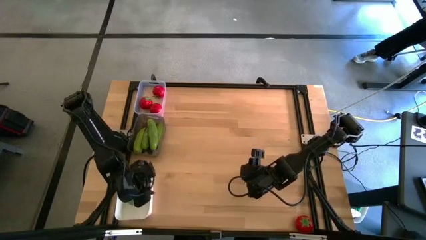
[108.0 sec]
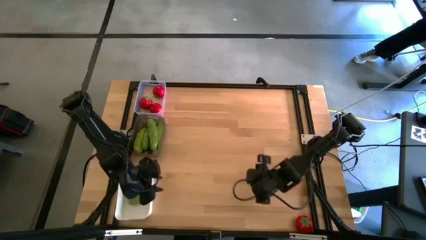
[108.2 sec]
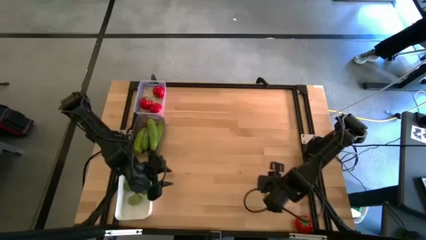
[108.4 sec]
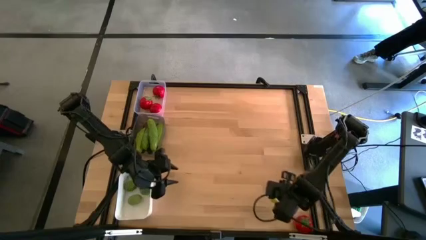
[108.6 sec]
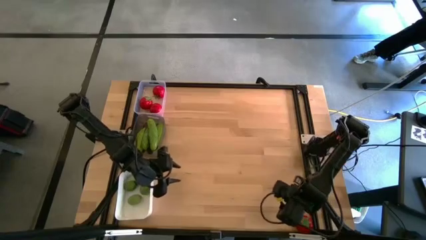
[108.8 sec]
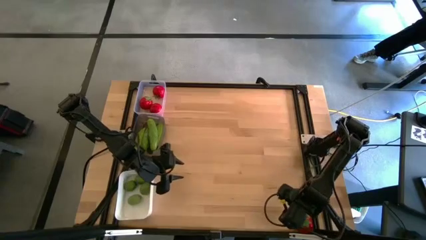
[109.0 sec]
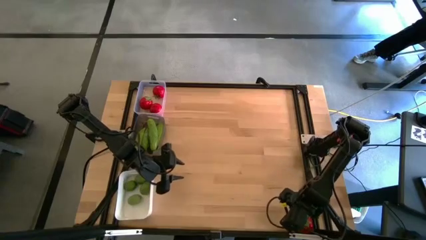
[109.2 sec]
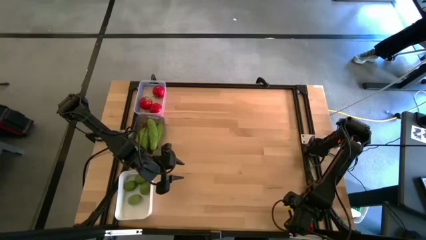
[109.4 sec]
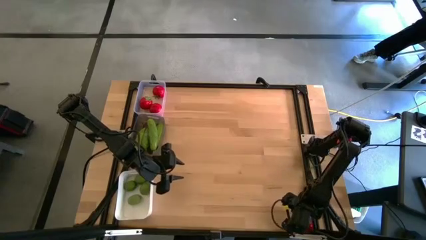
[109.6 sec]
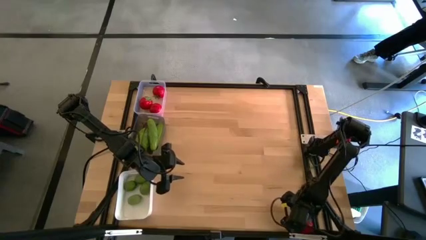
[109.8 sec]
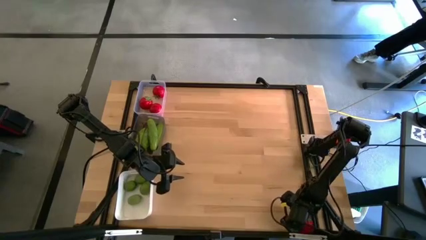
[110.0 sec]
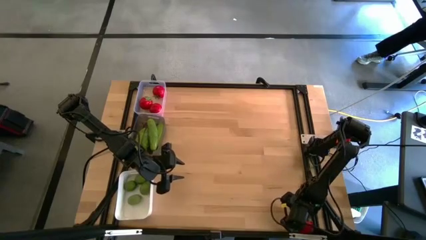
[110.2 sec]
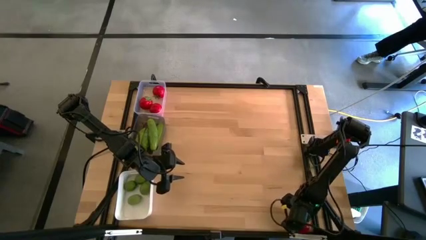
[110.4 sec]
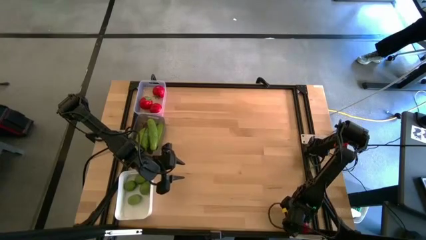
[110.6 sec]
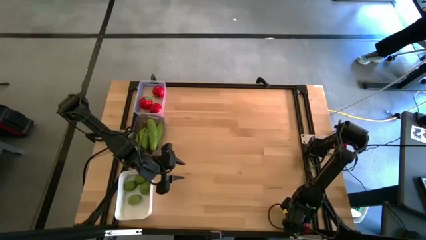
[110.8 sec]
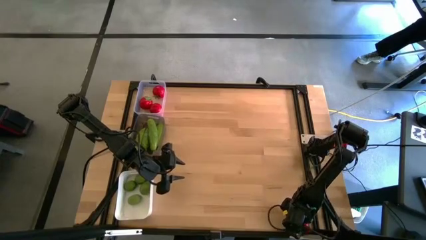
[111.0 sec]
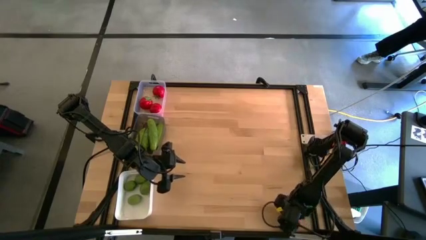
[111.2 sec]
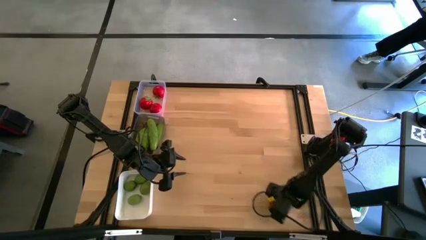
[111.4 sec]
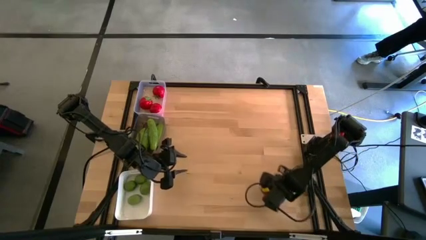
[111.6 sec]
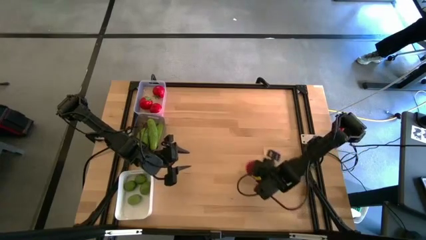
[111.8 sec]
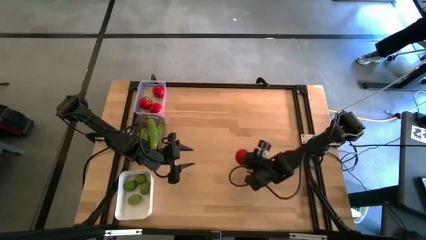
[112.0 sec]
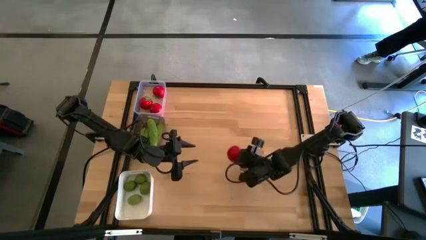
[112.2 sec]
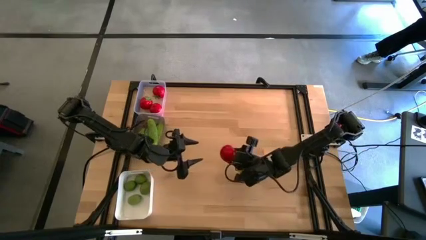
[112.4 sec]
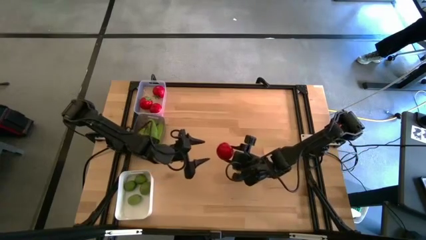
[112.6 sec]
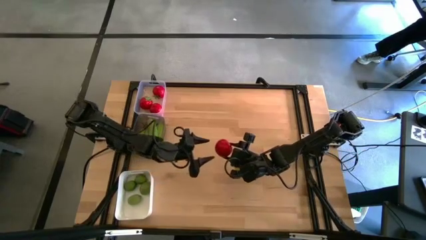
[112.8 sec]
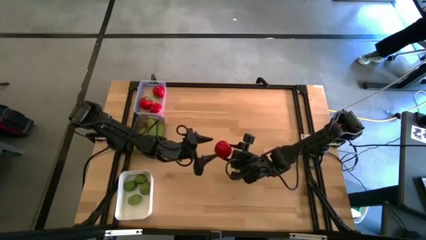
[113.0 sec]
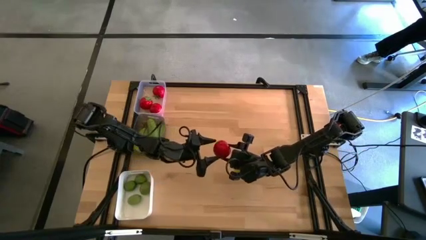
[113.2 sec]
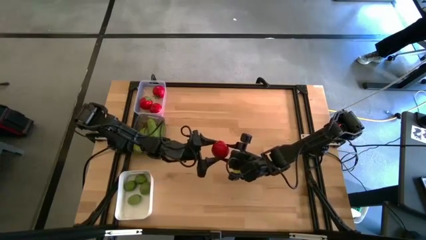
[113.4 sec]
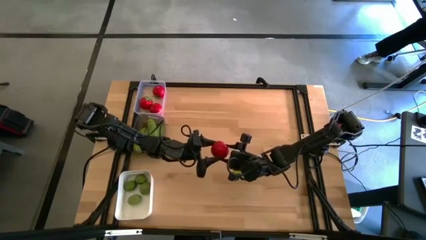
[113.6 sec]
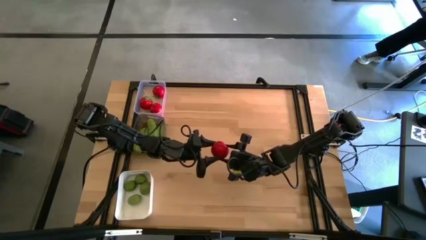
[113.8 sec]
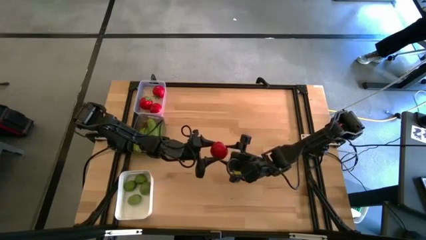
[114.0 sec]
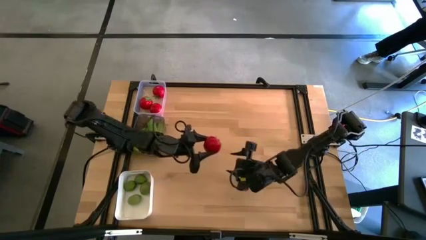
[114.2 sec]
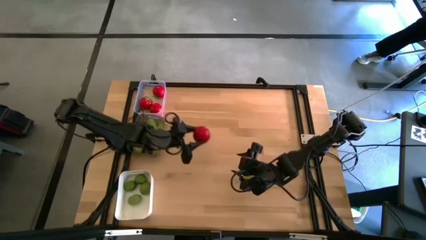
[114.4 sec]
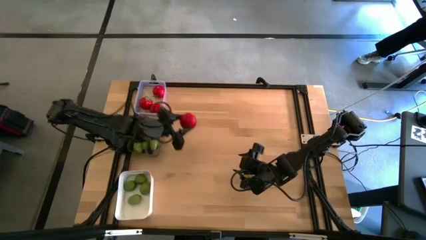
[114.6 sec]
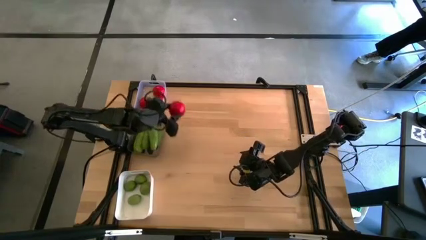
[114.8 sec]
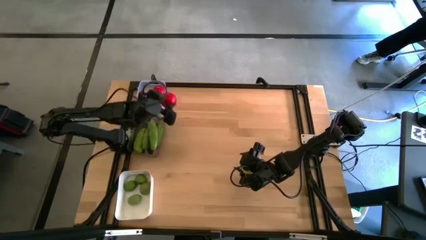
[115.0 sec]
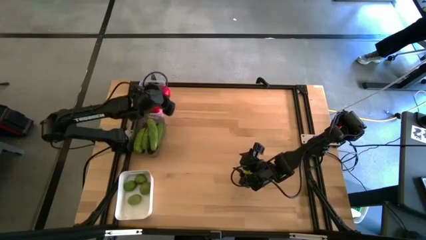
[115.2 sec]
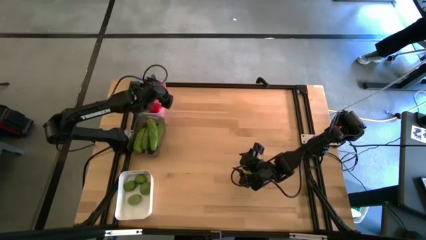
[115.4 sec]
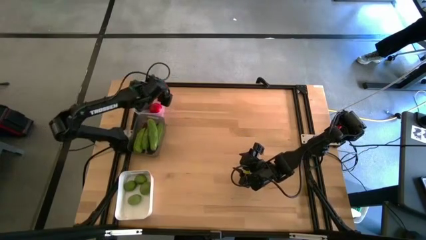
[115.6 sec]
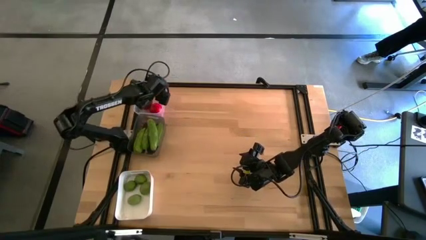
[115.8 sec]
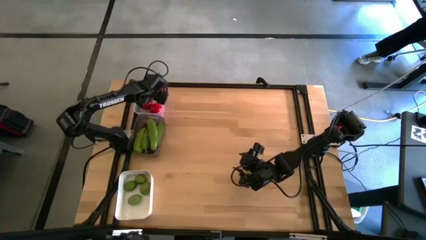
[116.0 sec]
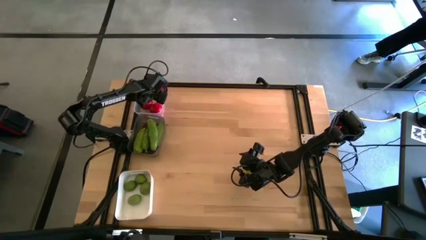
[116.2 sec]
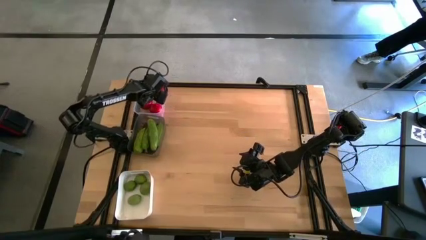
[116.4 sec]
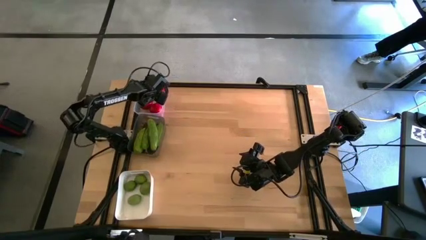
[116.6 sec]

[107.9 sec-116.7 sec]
Task: Sort produce into baskets
Put the tomato into the transparent bin

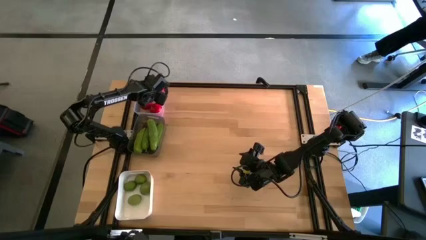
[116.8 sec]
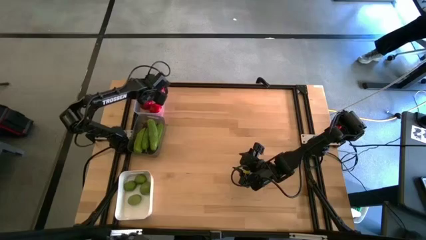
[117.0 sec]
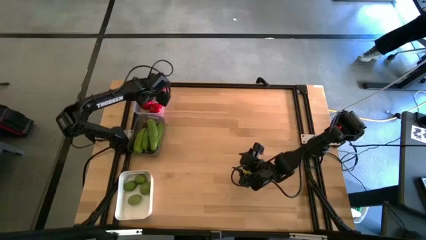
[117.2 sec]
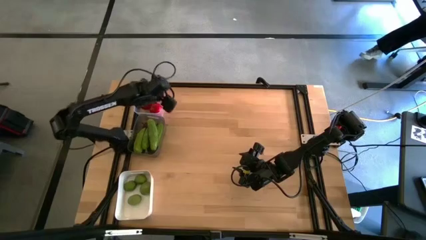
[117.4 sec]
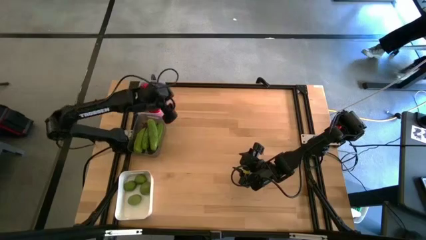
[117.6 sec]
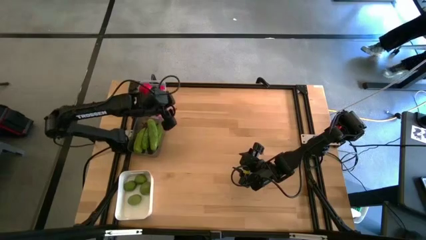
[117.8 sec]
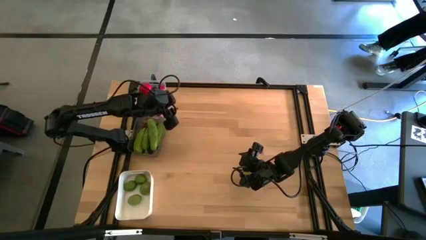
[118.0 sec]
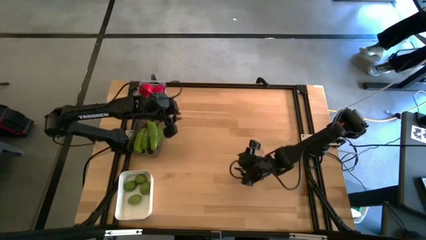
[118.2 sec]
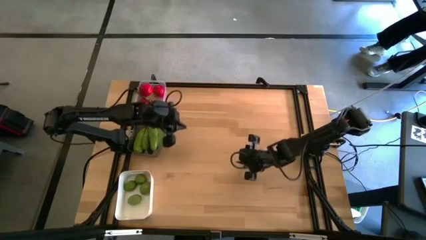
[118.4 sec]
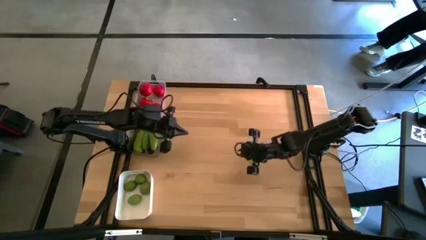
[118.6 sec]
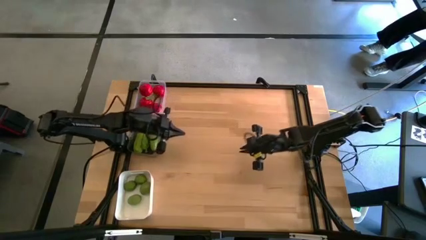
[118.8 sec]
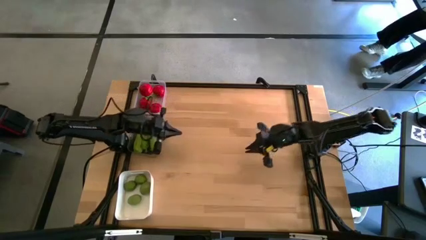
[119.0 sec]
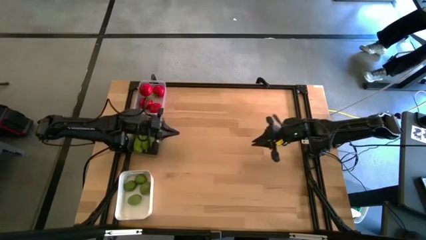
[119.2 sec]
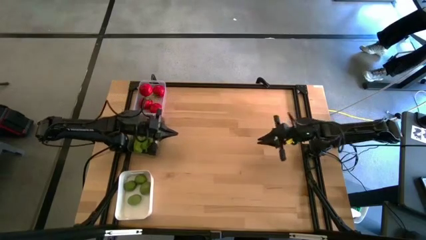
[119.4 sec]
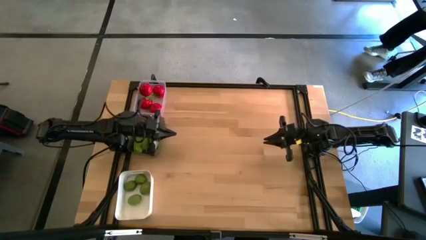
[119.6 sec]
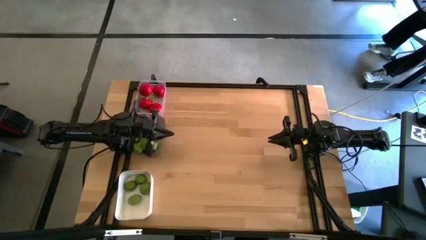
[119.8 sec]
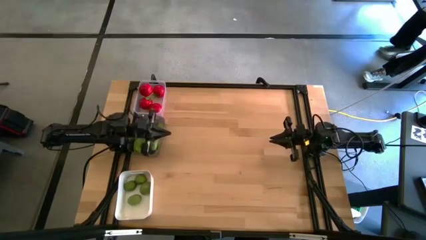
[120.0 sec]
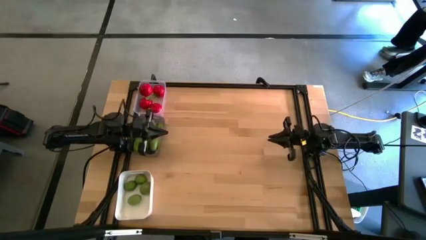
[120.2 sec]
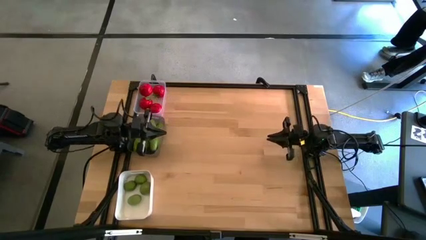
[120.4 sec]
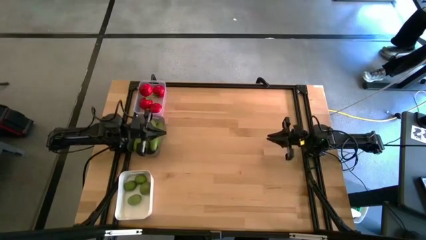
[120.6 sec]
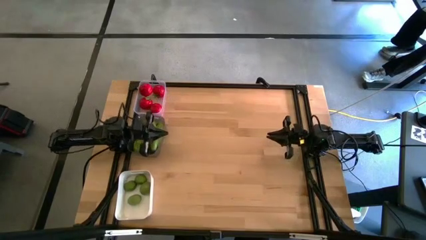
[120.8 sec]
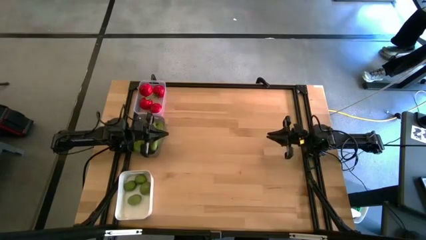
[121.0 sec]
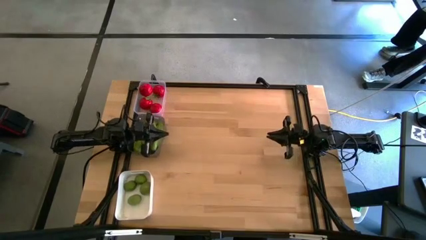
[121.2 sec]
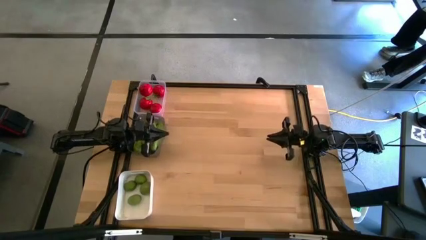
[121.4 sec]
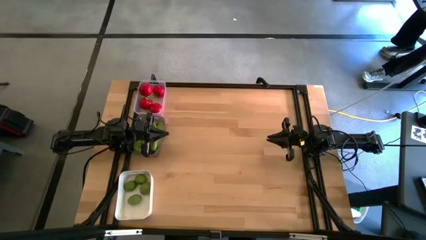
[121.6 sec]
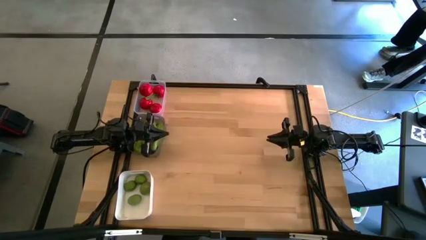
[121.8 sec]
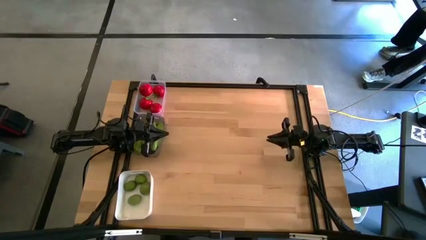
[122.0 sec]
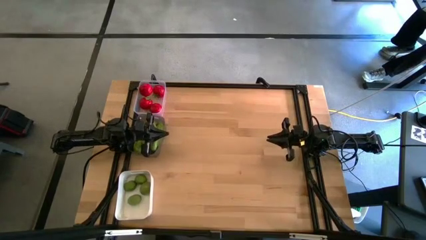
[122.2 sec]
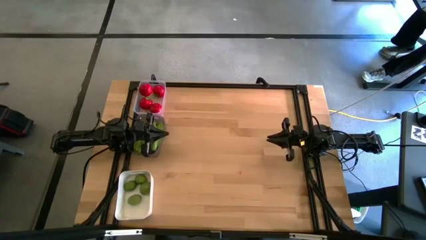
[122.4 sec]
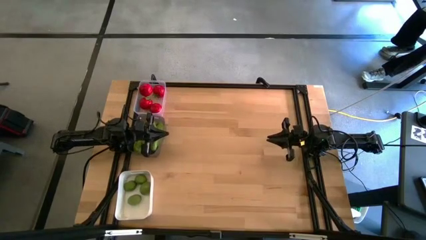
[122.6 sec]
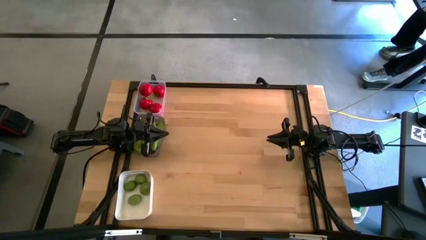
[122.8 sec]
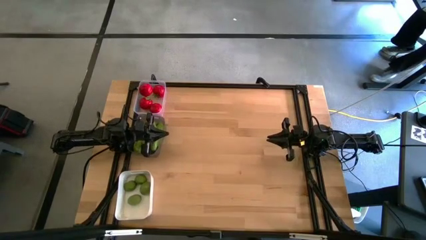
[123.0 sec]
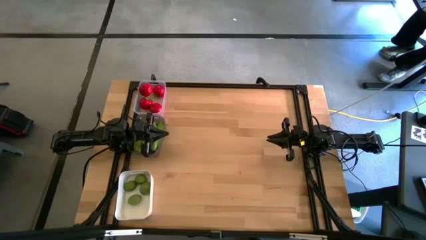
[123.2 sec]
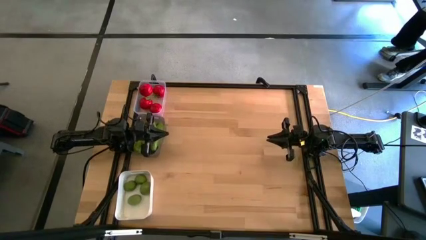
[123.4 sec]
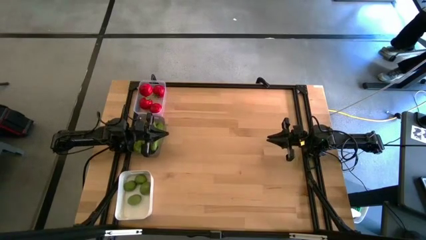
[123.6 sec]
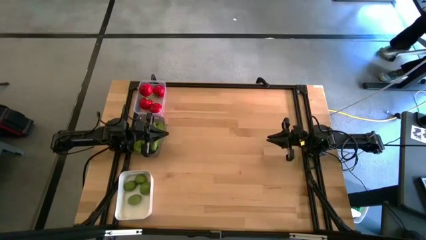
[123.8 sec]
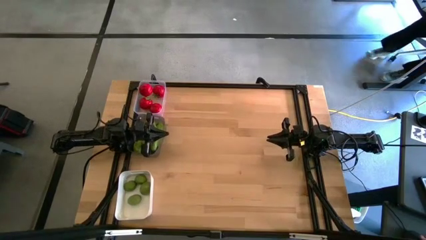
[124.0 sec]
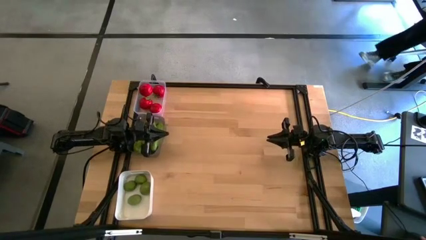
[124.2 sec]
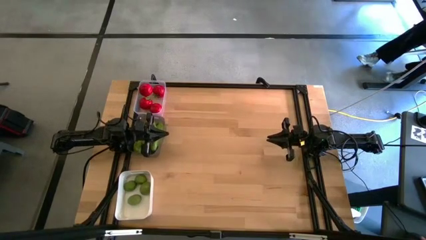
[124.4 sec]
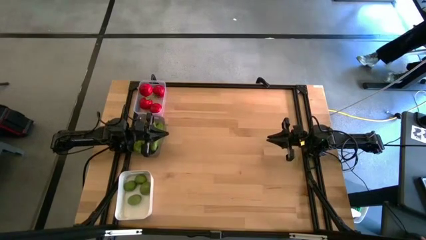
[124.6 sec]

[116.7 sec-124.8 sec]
Return to Home Position
